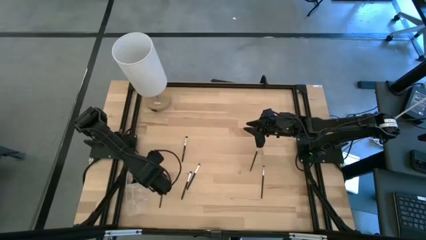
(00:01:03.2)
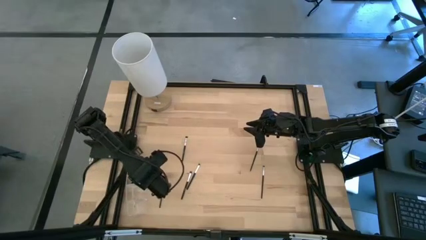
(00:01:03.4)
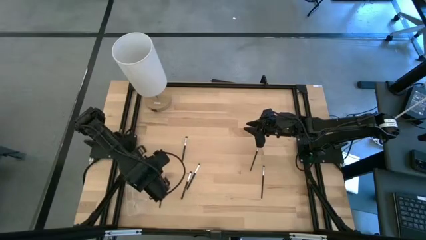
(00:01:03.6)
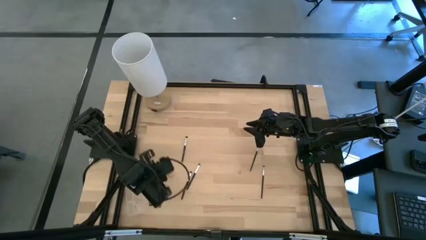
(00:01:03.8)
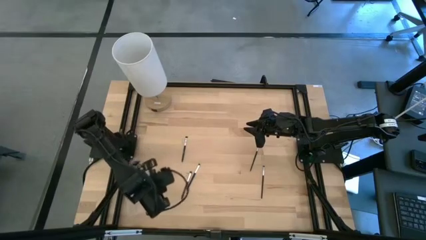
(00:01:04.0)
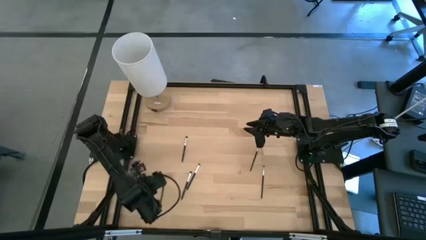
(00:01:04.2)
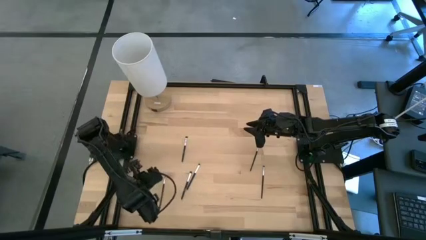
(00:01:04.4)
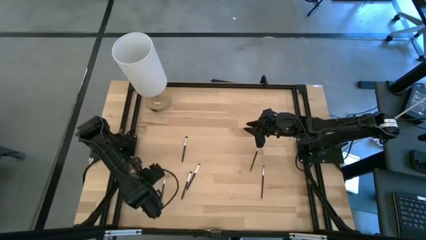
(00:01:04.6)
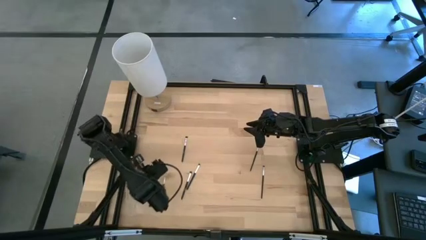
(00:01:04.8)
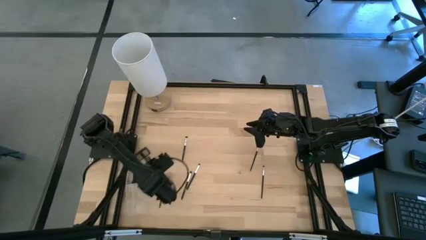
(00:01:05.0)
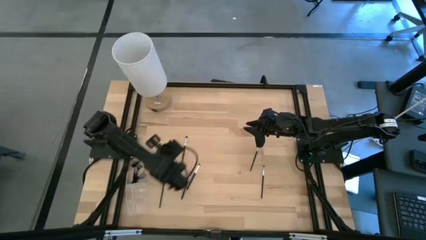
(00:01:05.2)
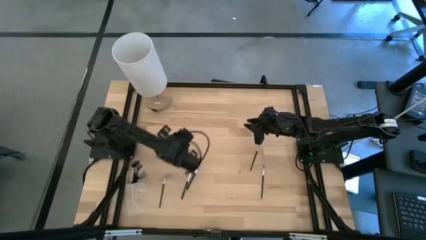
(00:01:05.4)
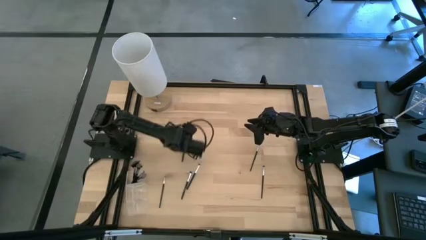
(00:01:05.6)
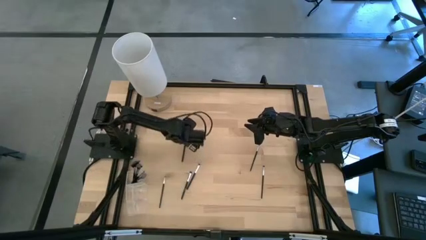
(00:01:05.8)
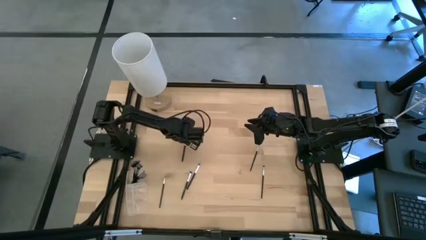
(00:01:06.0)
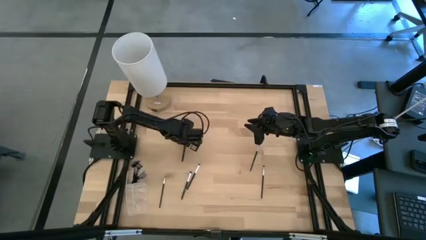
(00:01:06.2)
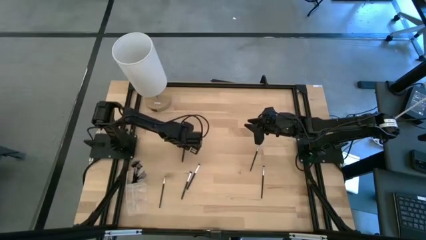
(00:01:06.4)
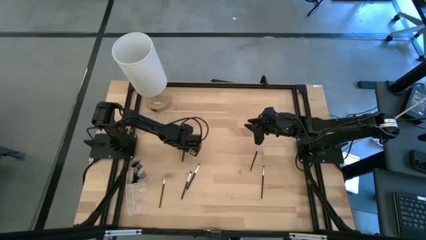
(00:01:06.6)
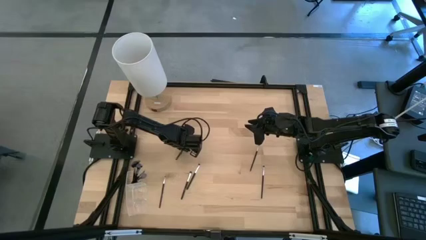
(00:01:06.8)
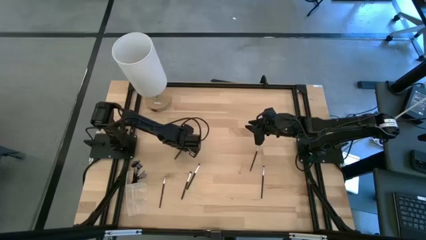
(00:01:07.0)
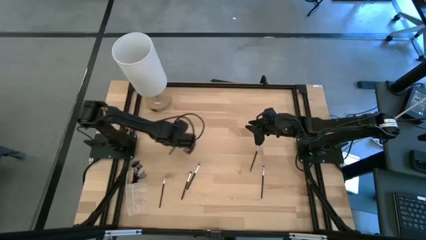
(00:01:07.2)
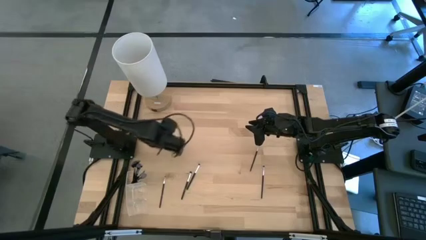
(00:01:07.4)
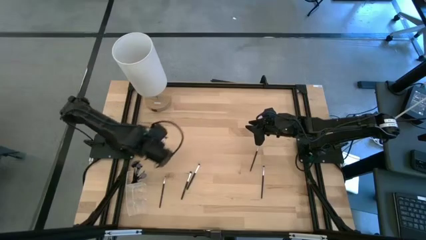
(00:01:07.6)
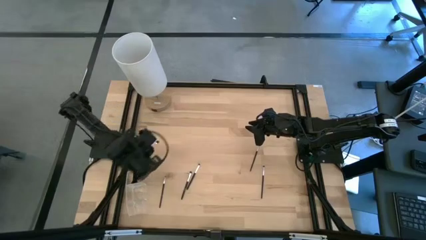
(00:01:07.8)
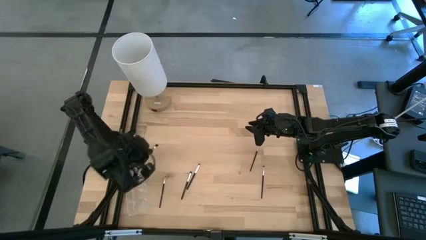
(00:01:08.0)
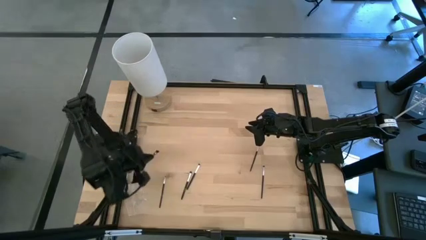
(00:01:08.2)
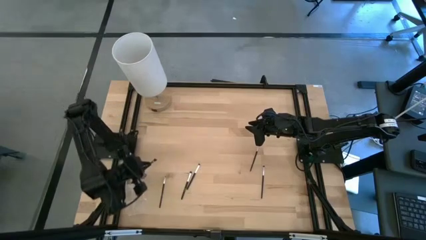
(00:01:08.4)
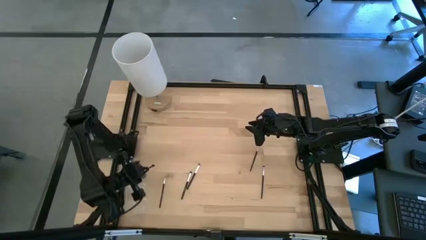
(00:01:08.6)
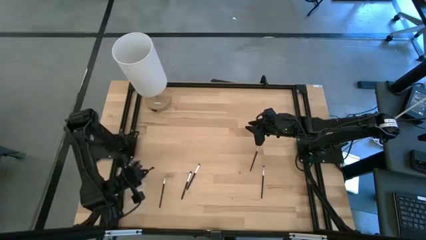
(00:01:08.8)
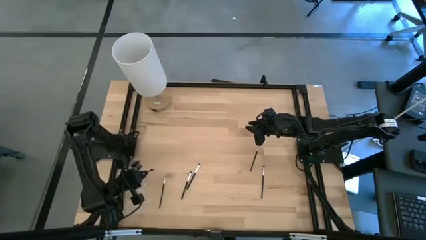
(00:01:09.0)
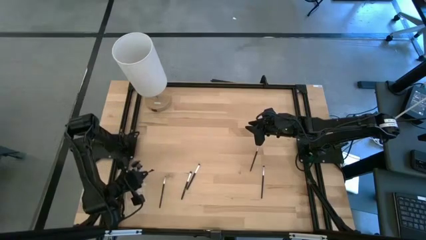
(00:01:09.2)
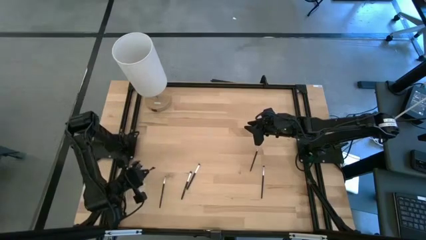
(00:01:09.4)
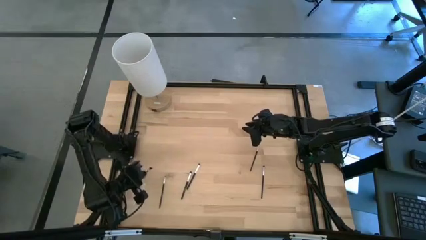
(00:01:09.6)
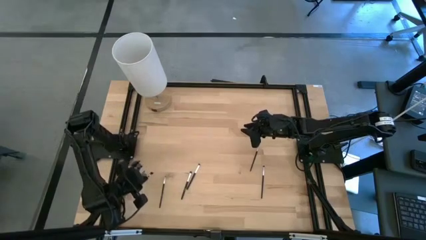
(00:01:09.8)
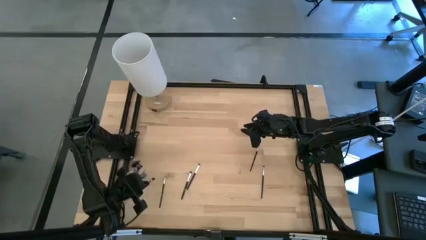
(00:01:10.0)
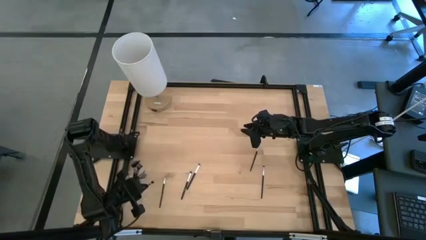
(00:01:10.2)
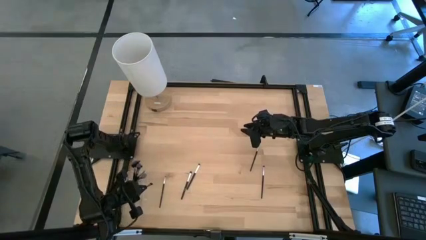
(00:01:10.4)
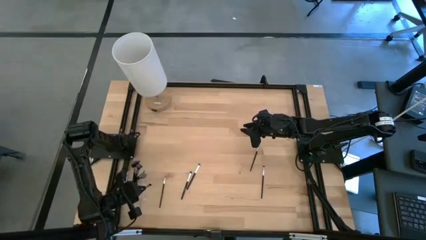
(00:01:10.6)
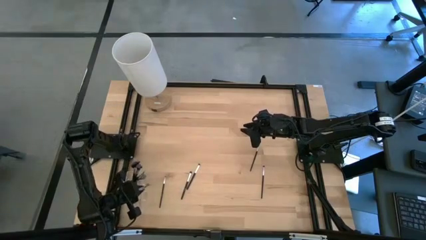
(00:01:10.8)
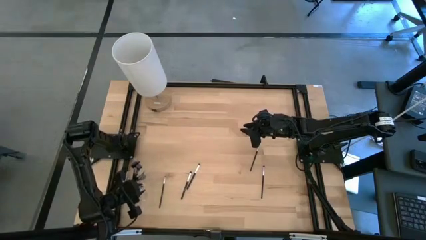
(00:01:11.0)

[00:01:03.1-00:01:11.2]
Task: Pick & Place Makeup Supplies
Put the makeup brush into the transparent organizer

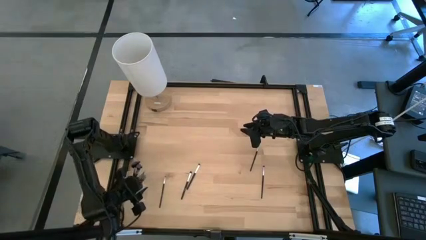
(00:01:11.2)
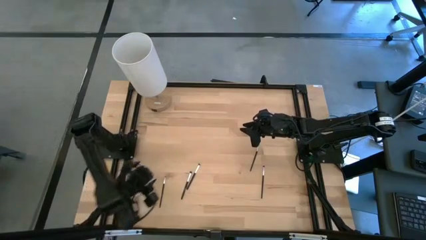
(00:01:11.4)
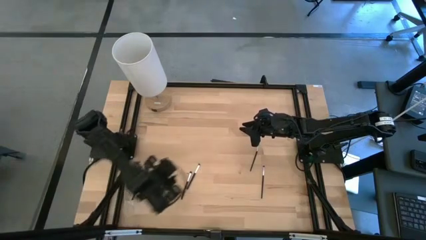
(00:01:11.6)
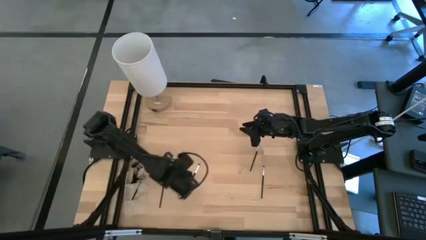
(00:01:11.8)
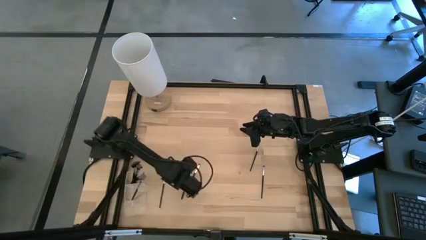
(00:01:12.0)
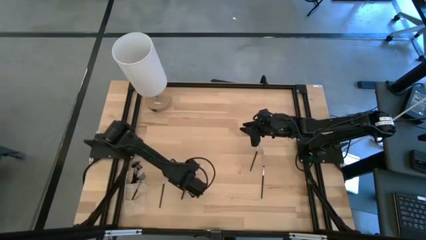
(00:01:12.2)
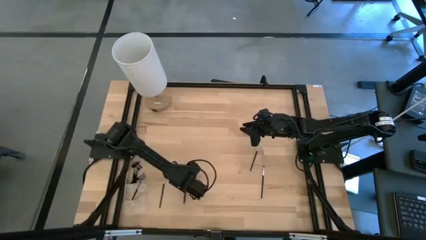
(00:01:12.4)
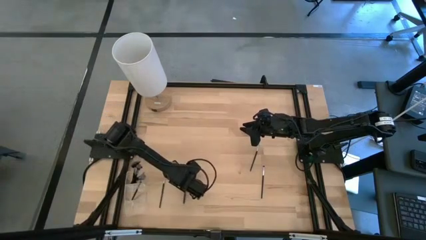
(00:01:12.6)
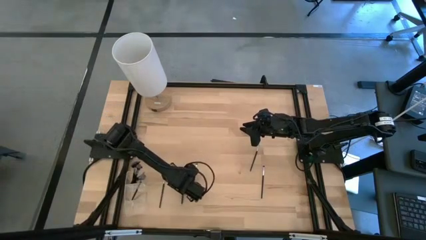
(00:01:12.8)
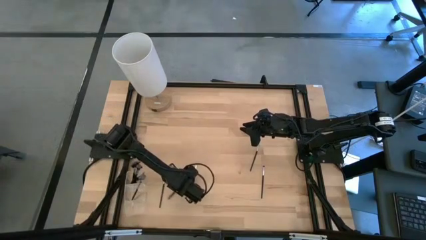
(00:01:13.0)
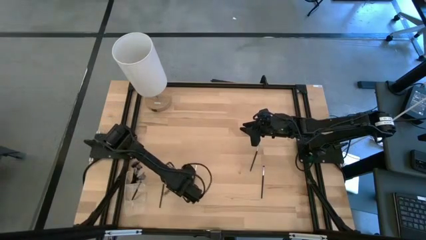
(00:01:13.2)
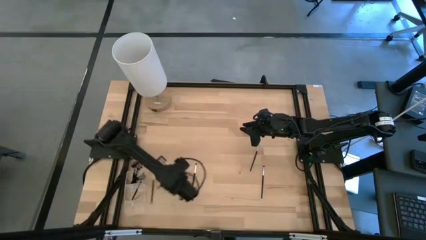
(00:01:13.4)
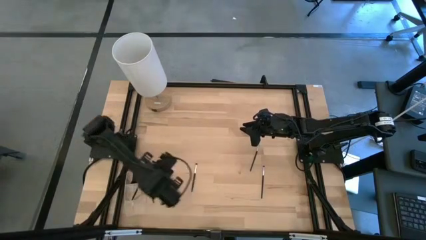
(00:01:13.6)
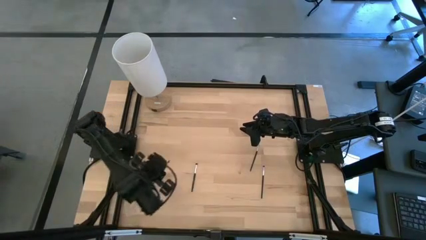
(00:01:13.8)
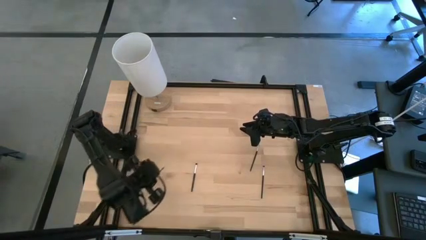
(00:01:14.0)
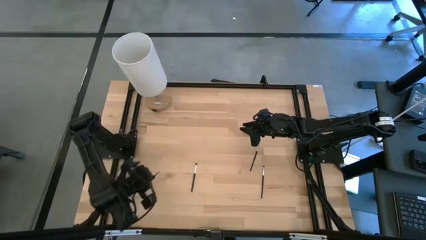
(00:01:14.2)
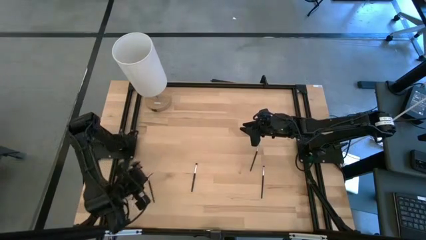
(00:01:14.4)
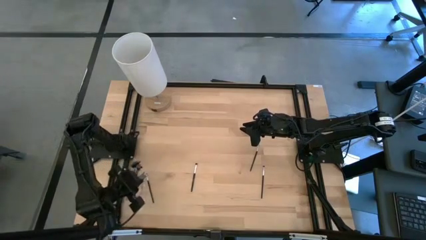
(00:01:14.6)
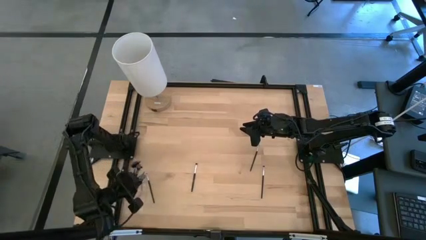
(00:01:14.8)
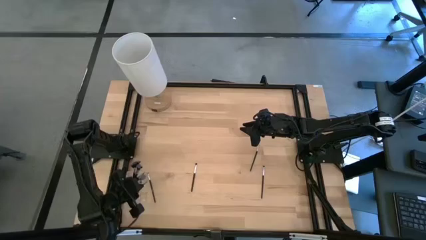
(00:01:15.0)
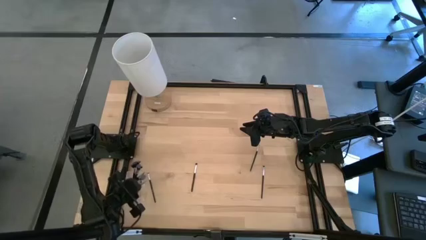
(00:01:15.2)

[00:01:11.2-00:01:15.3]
Put the makeup brush into the transparent organizer
